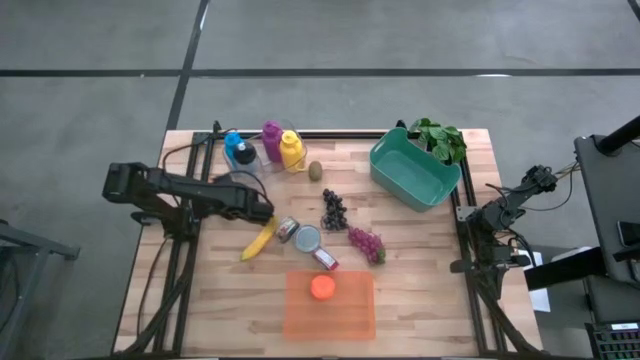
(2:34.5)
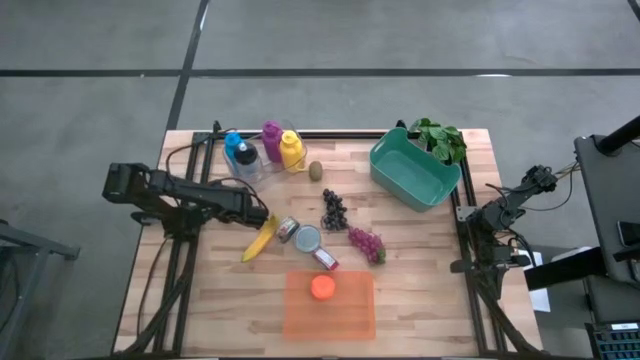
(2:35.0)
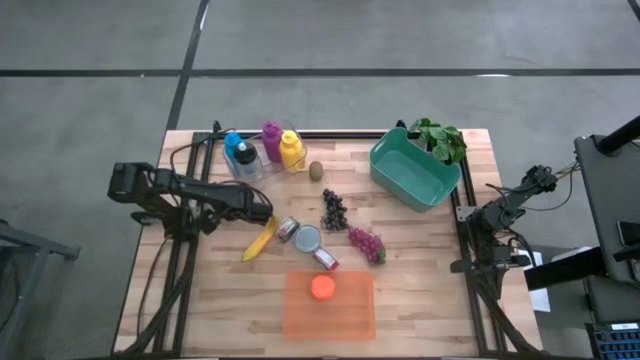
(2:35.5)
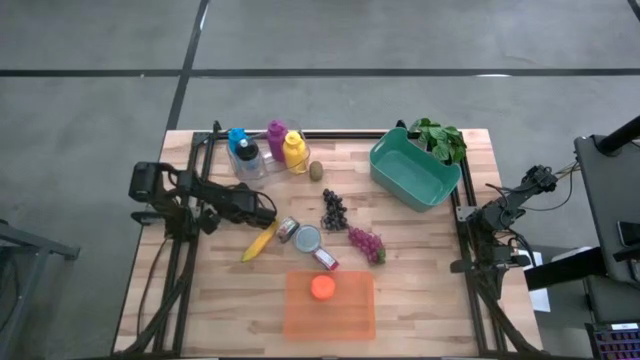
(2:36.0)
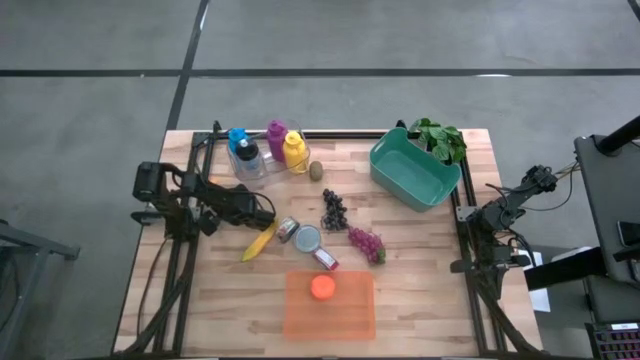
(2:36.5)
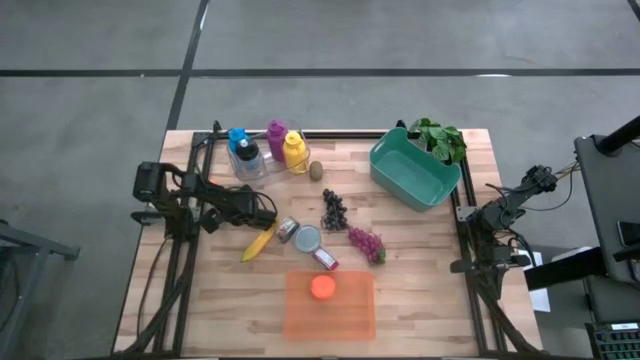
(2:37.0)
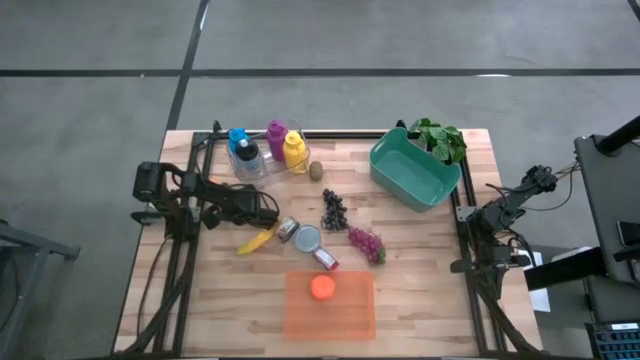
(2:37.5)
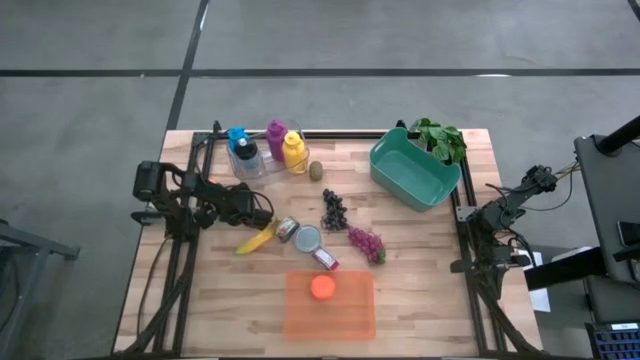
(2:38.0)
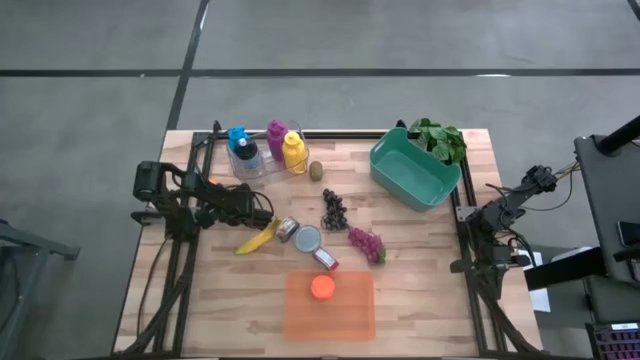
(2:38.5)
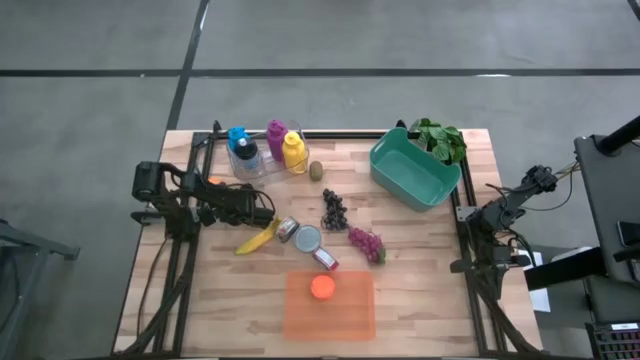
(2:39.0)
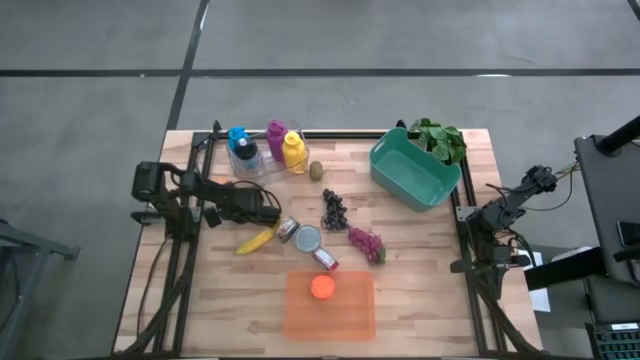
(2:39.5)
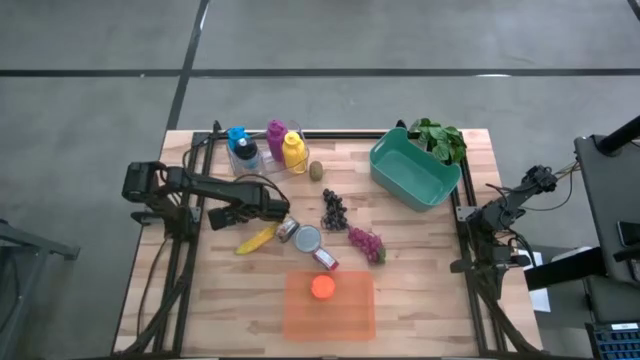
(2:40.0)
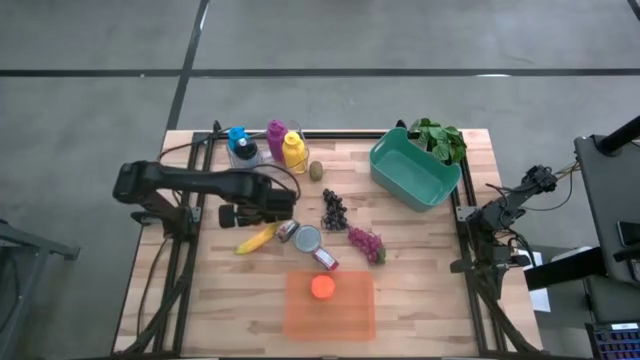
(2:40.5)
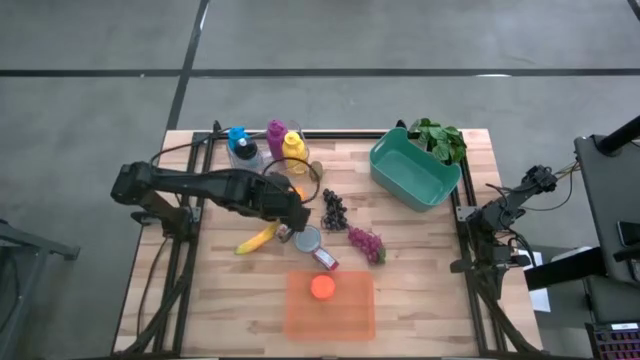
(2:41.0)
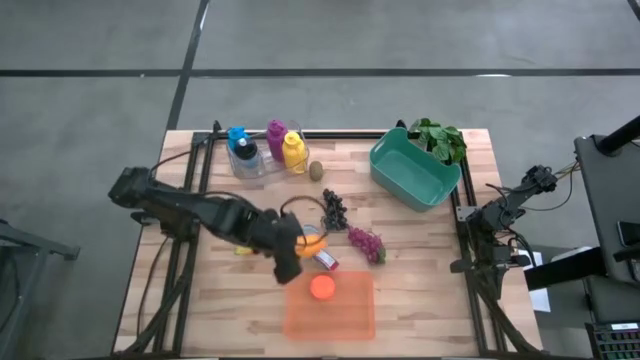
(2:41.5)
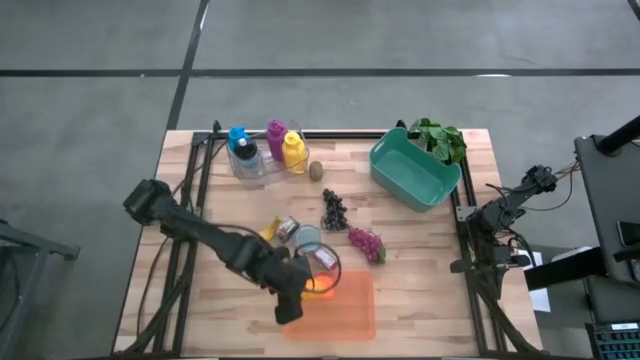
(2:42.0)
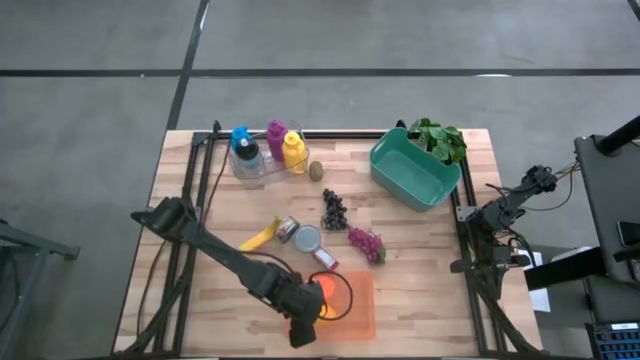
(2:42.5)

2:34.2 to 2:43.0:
Task: Pick & Place Food Item
Put the yellow mango into the orange bin

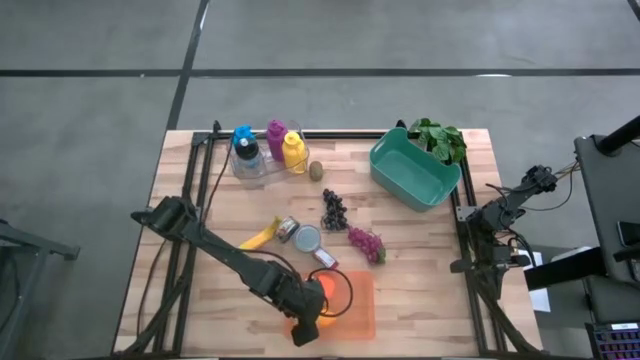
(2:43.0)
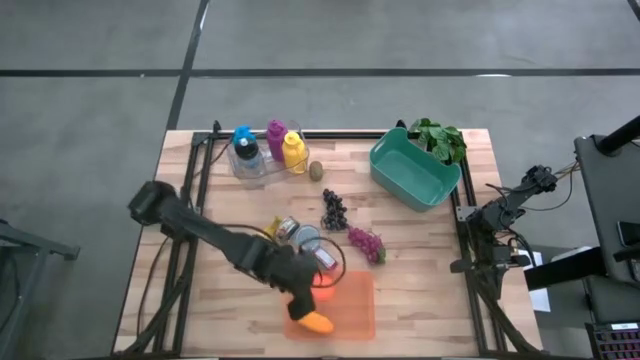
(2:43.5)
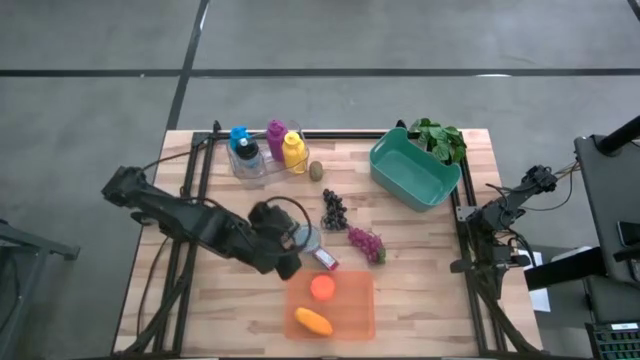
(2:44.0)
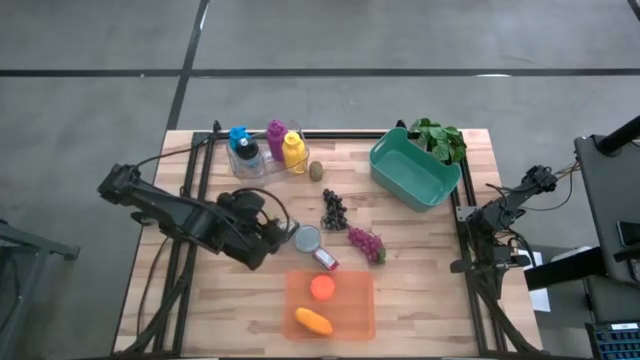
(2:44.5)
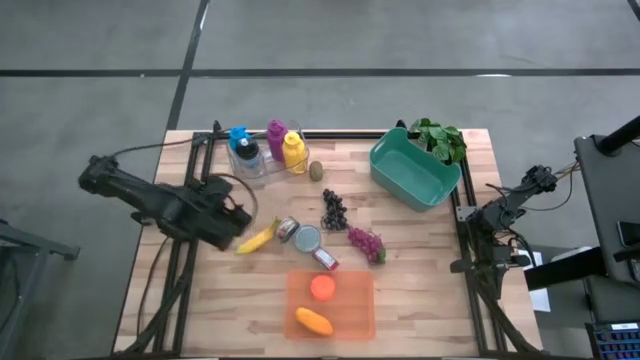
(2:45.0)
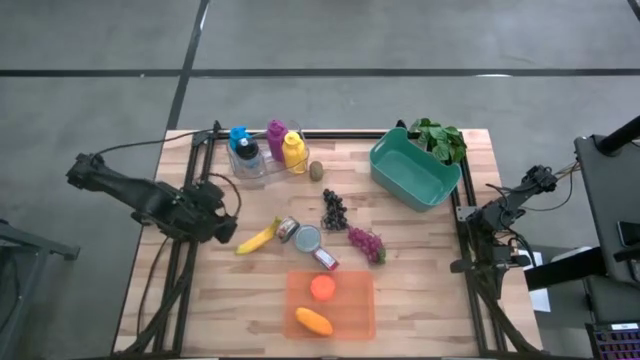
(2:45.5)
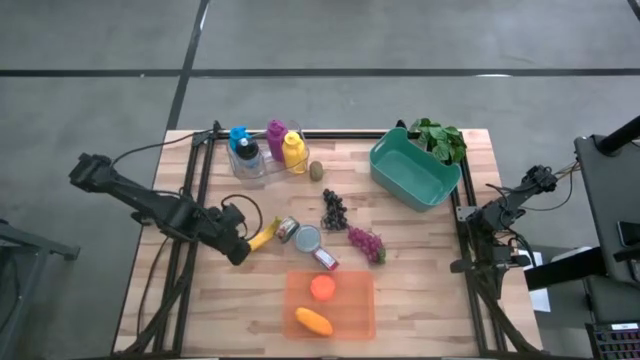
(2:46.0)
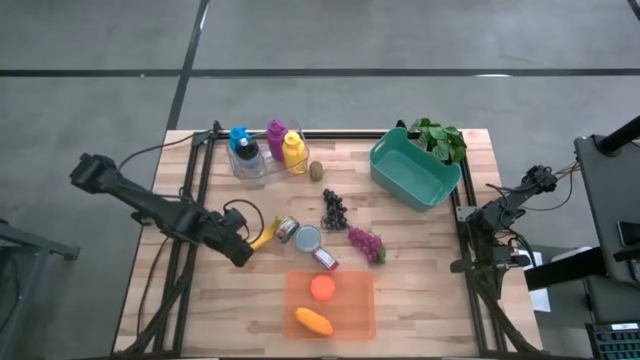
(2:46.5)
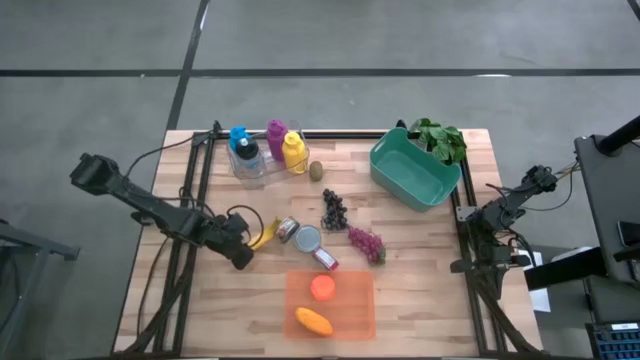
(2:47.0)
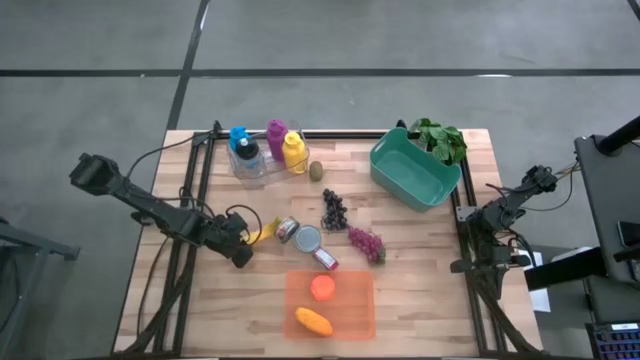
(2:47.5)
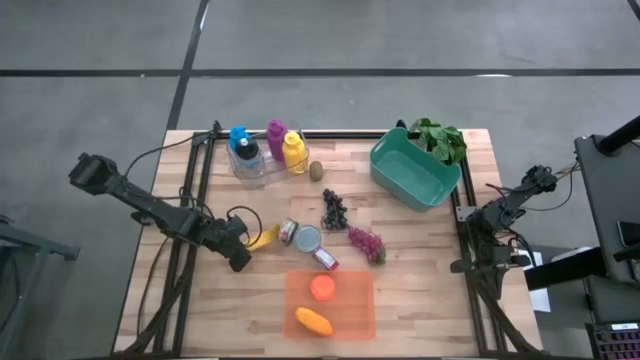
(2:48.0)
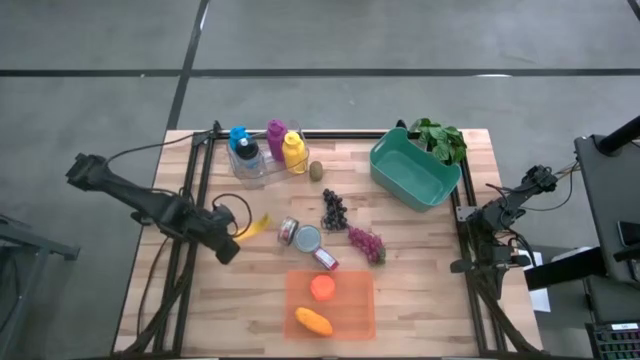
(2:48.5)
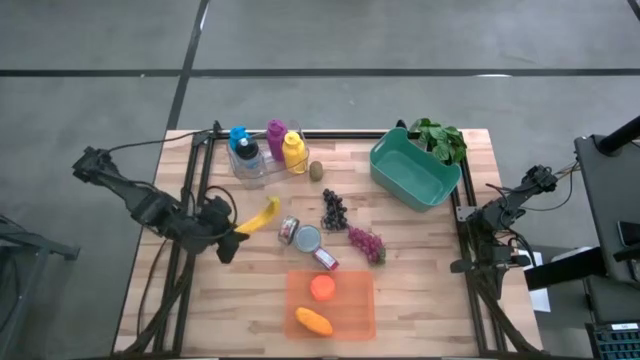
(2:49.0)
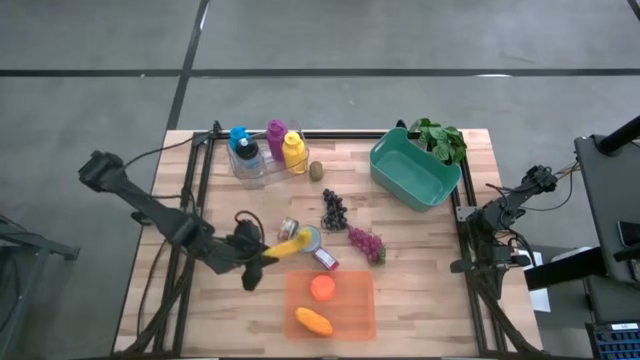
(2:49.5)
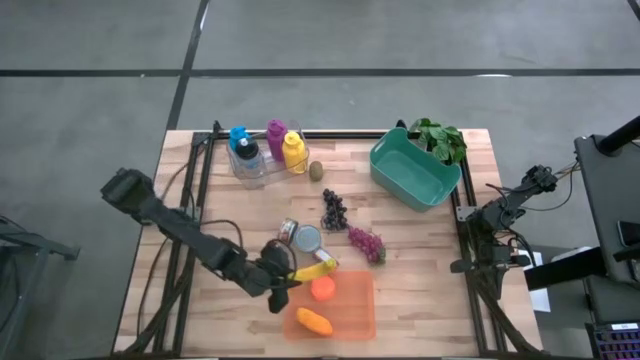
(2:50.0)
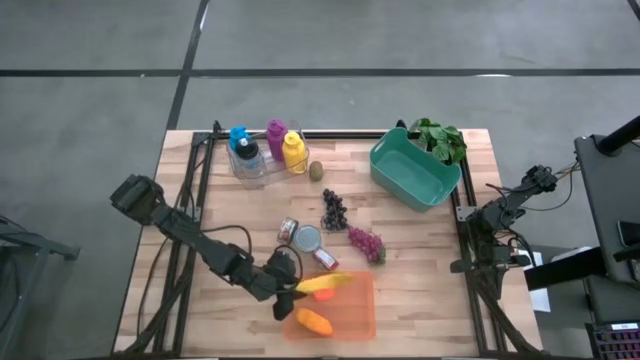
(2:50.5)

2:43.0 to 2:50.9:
Put the yellow banana into the orange bin
